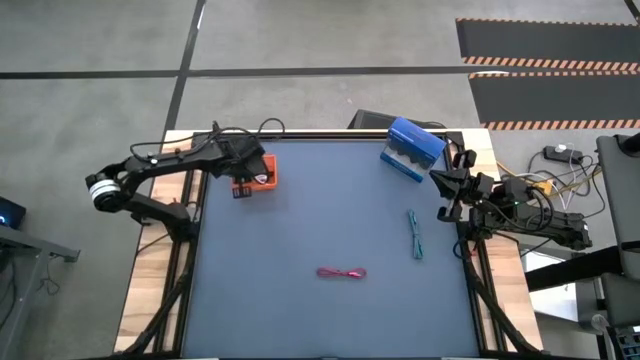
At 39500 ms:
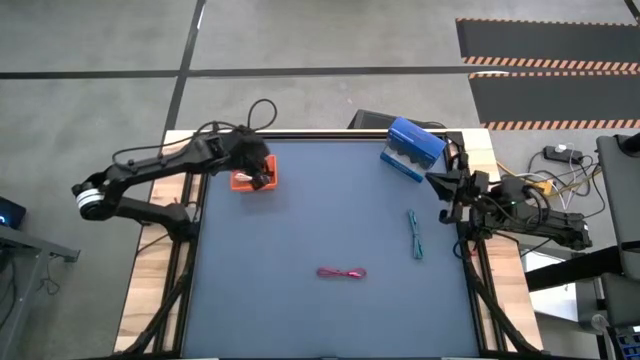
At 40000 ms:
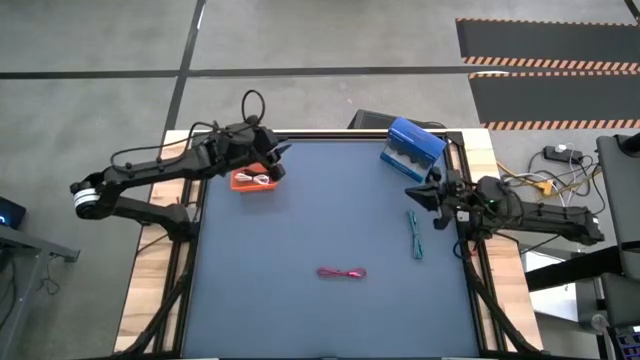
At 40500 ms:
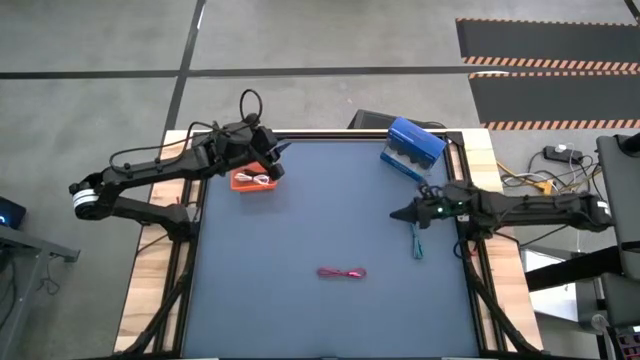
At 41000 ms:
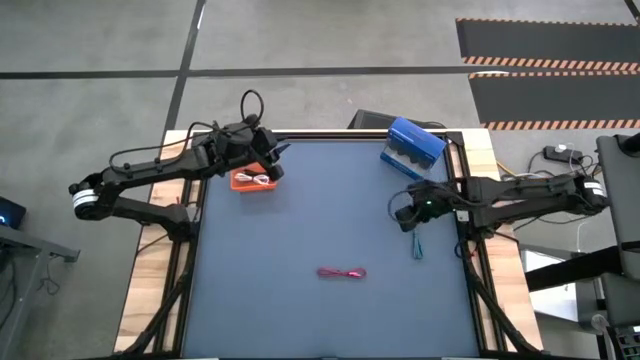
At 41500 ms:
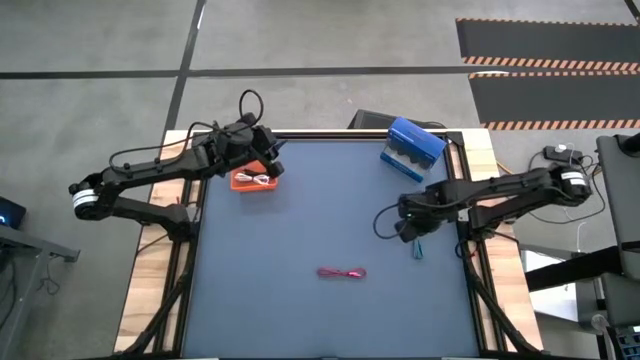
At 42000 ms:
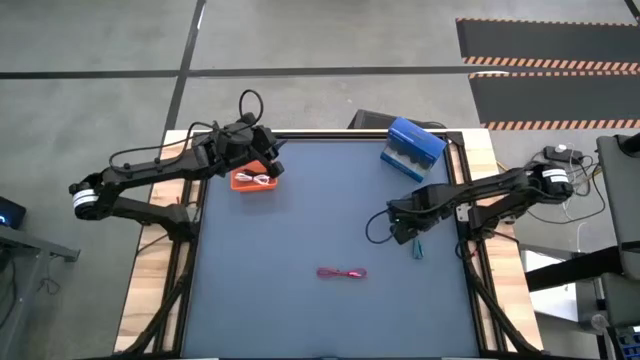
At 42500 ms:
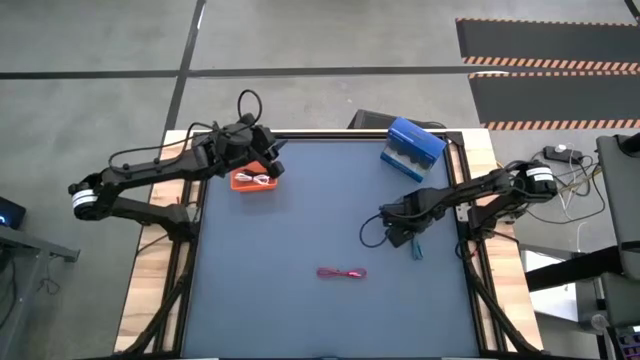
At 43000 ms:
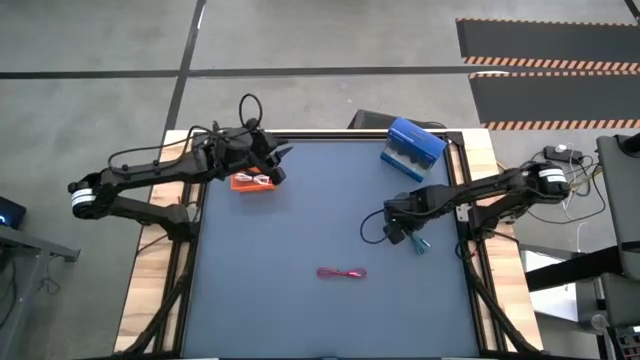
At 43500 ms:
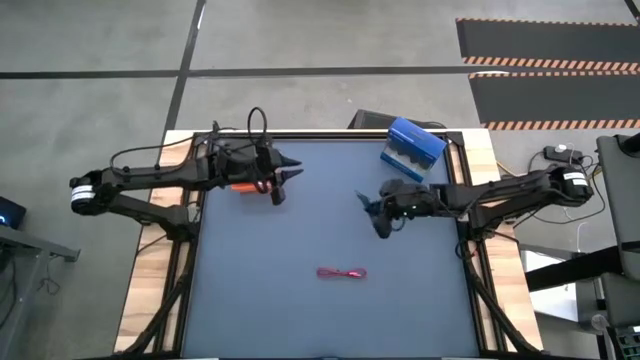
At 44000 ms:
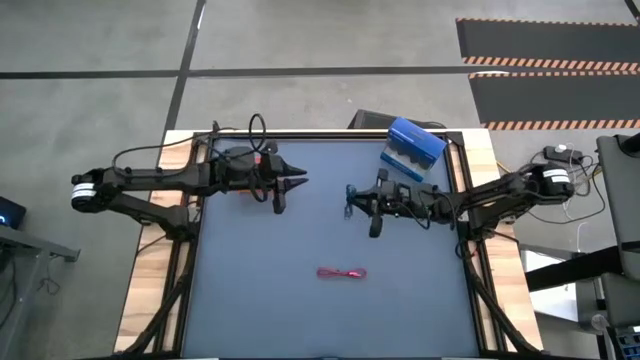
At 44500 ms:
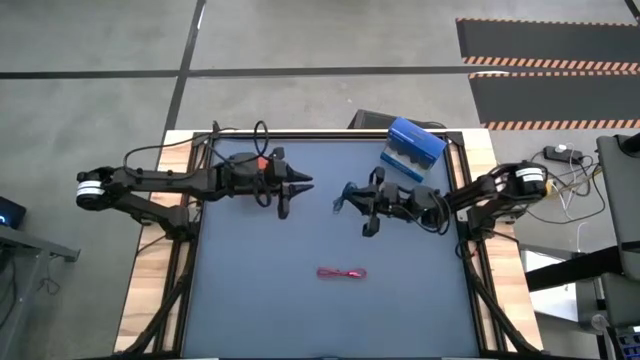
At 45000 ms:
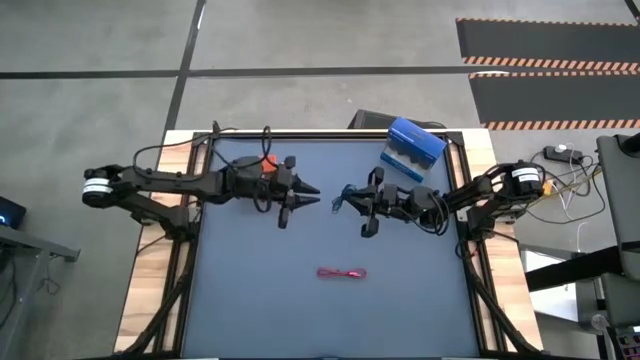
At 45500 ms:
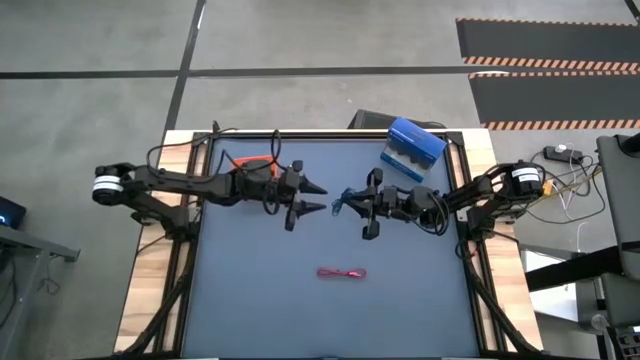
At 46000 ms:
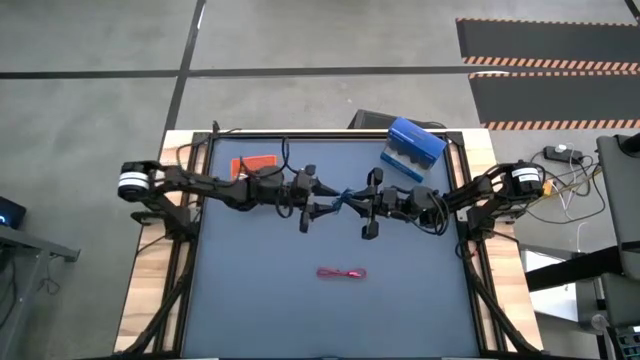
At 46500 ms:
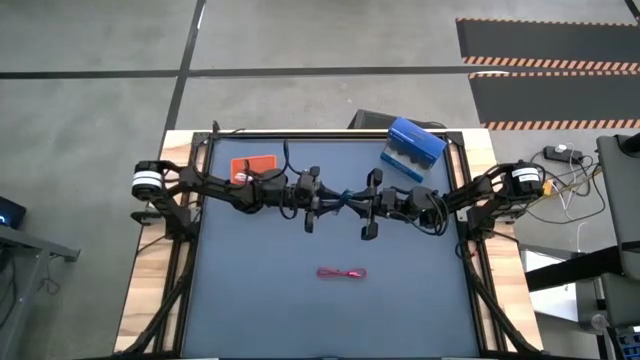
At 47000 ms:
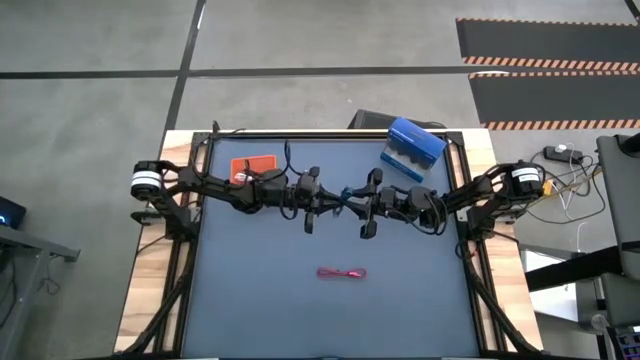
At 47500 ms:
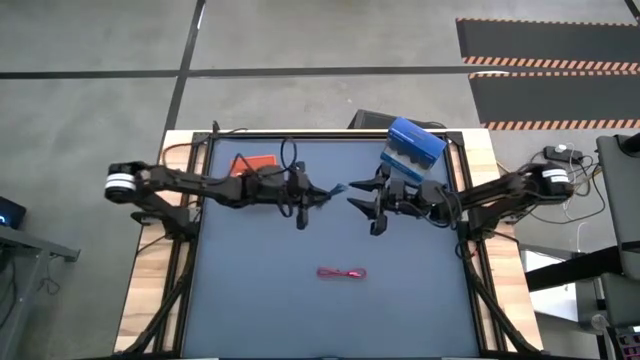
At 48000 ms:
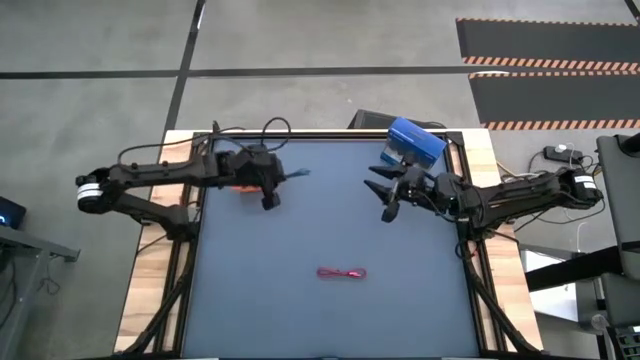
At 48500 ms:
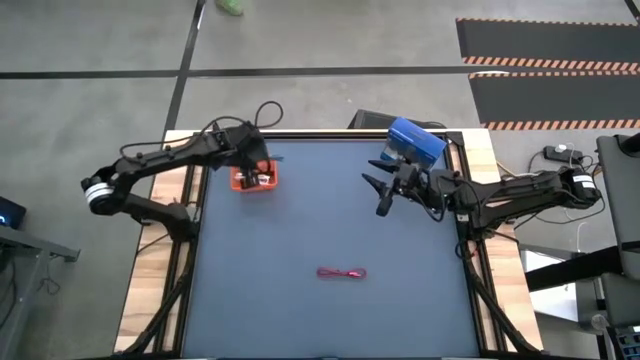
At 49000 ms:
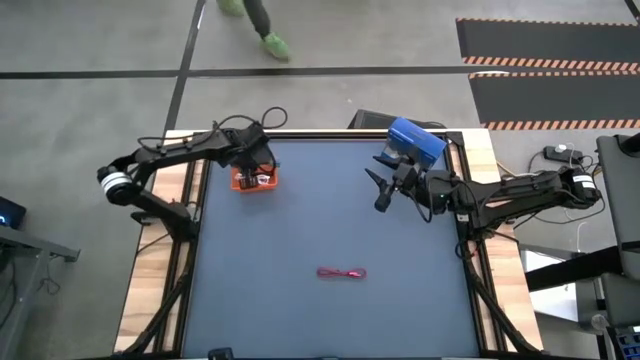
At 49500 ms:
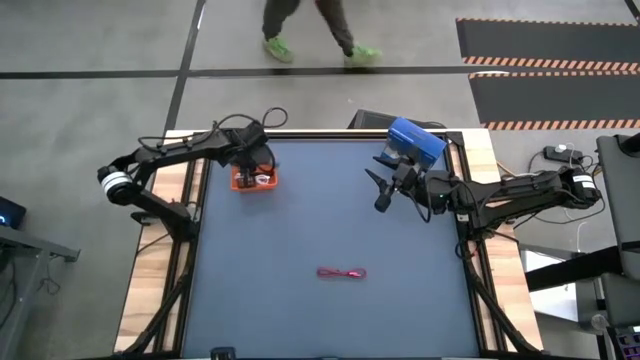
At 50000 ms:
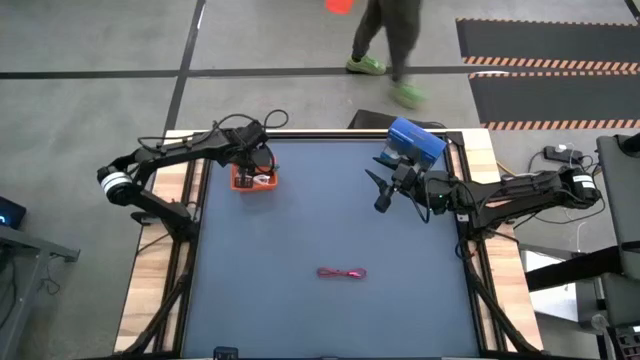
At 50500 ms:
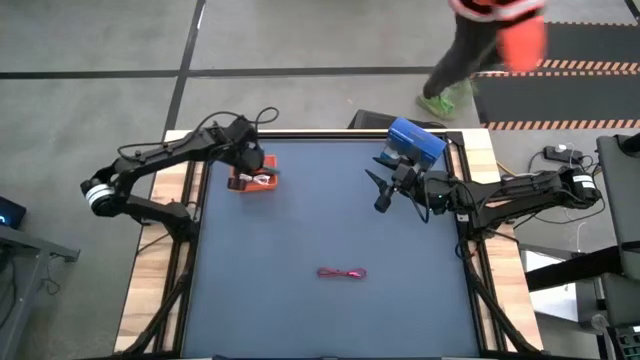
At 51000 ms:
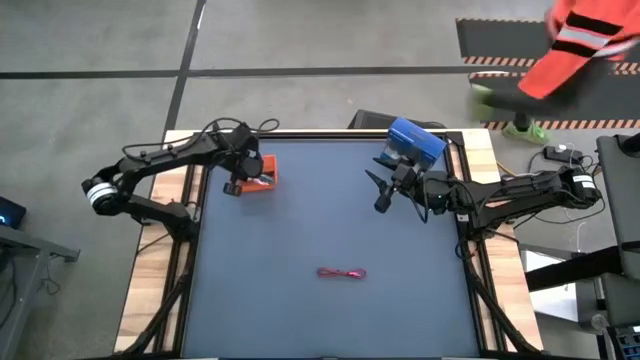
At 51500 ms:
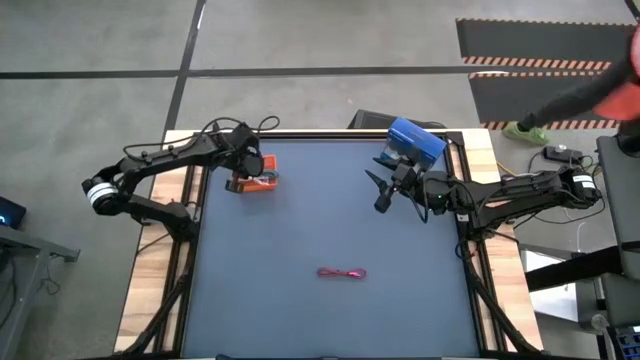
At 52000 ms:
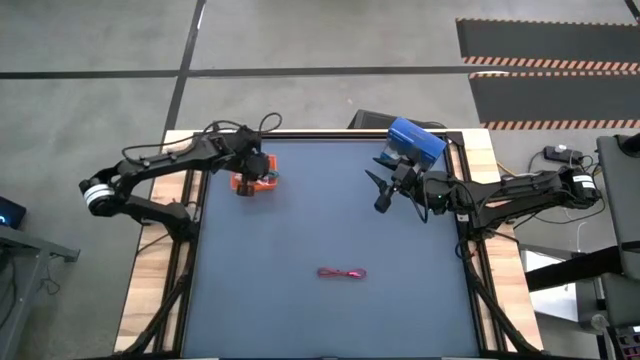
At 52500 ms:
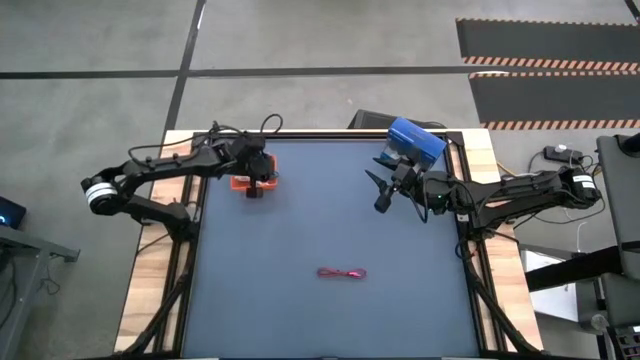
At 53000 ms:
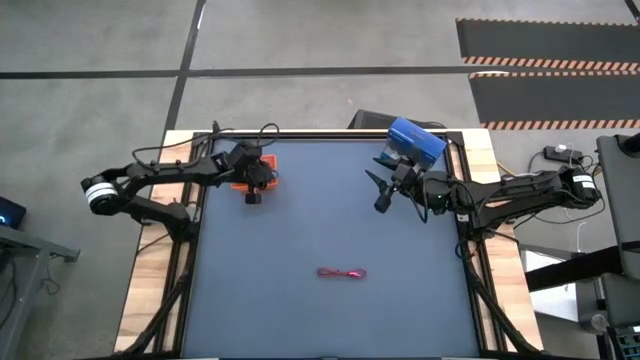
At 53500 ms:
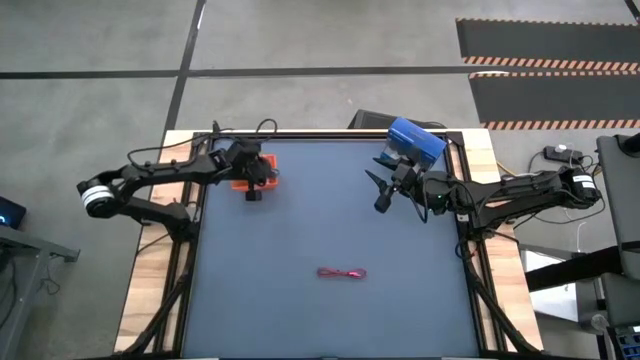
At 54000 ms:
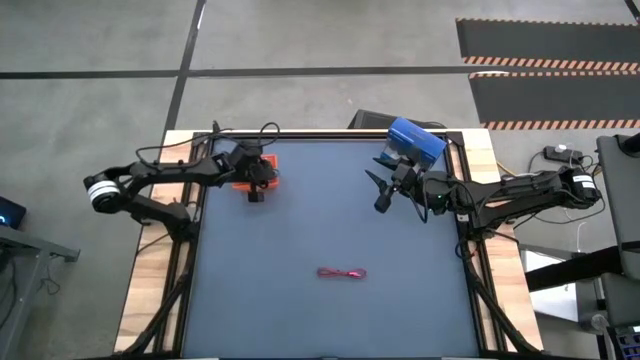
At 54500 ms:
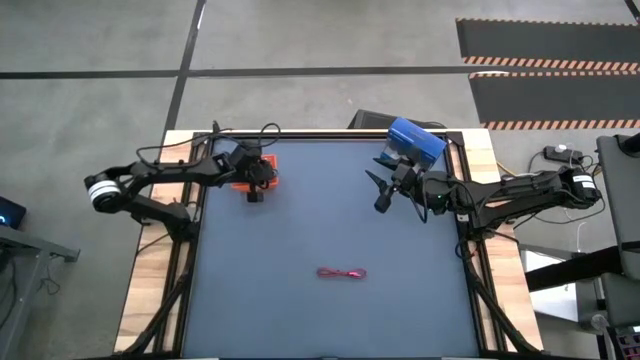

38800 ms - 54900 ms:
Task: Pick and place USB-C Cables
Put the black blue charger cable into the orange basket

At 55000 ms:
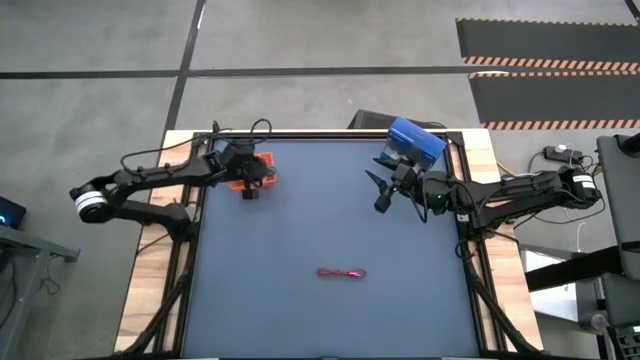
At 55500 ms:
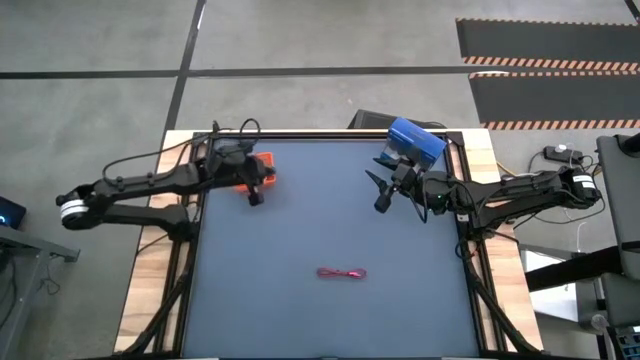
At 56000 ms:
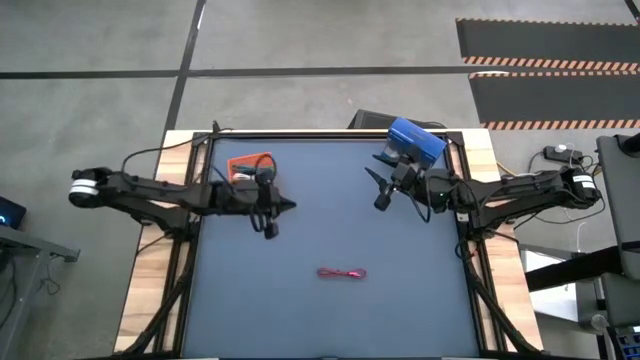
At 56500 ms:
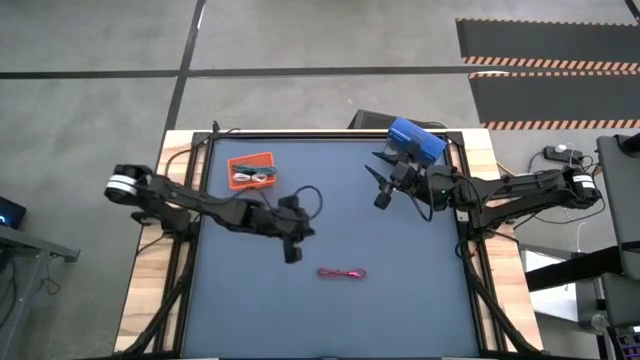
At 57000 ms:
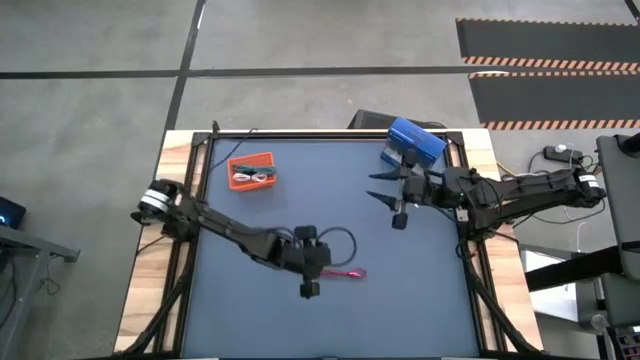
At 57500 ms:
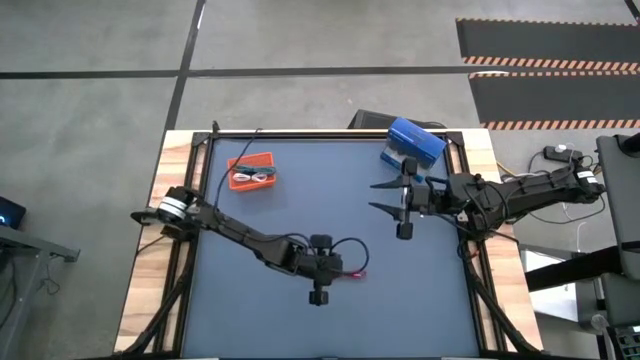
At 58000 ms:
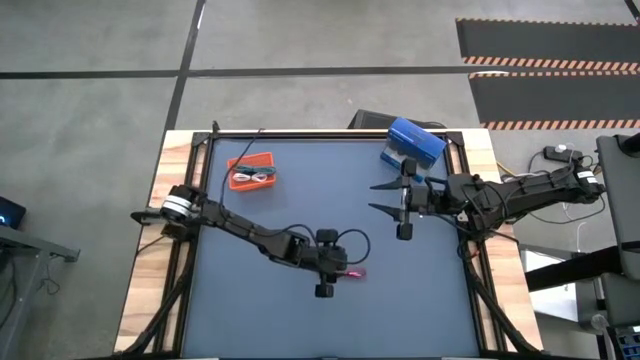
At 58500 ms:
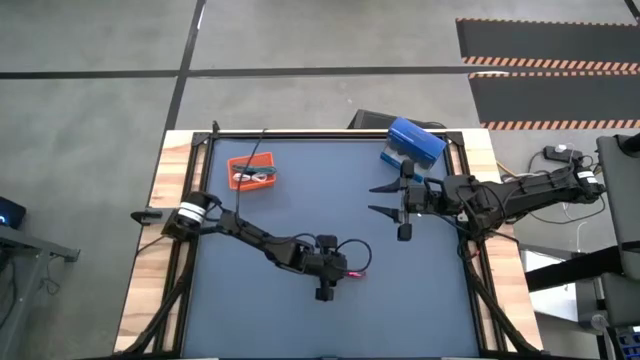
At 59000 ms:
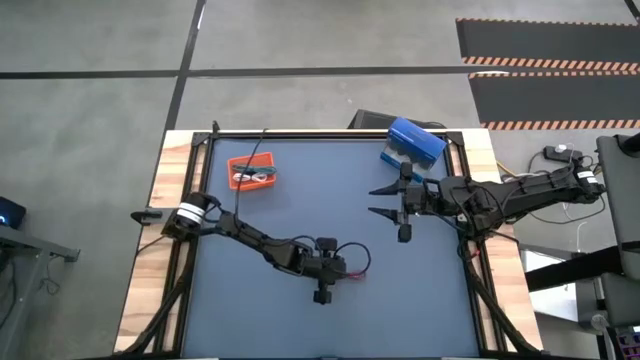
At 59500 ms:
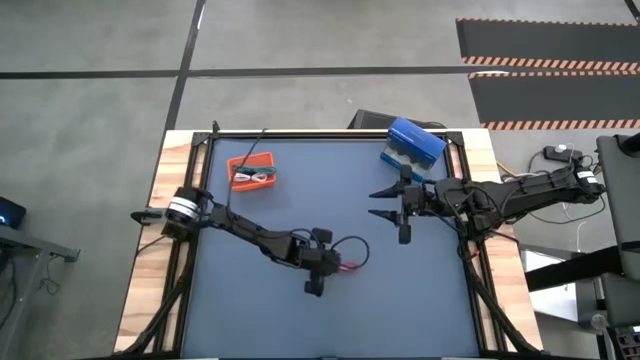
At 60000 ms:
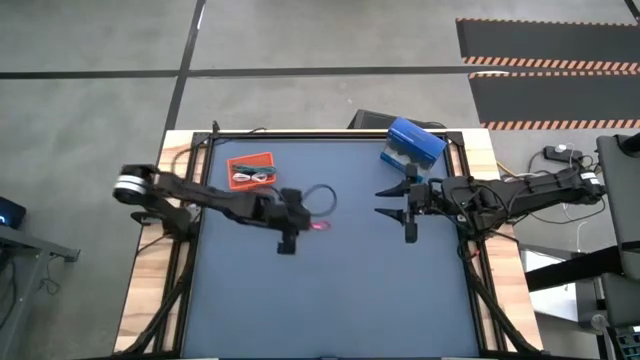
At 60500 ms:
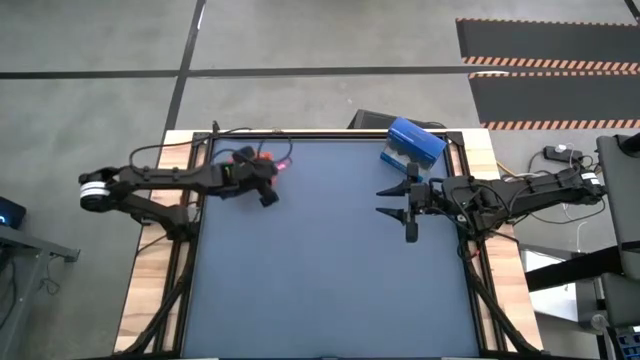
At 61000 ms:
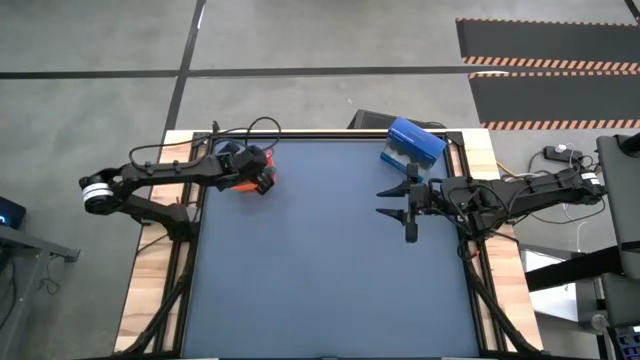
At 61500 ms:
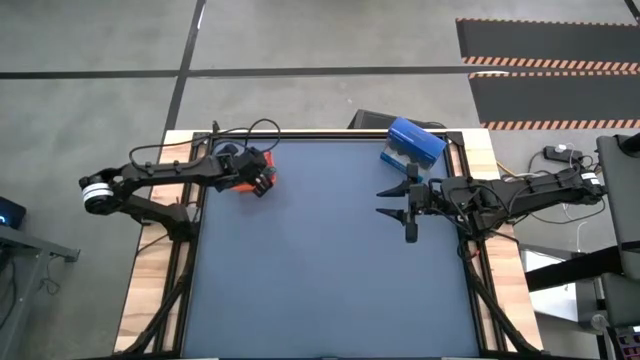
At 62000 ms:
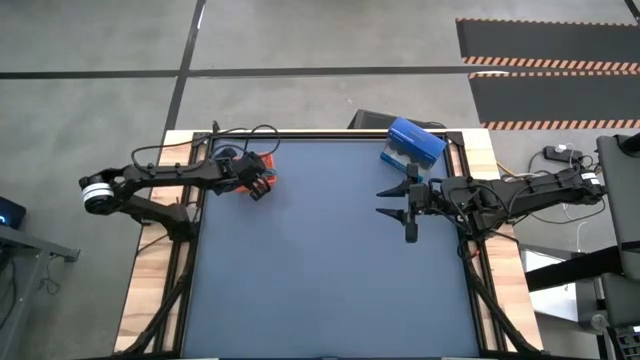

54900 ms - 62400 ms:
Put the black pink charger cable into the orange basket
